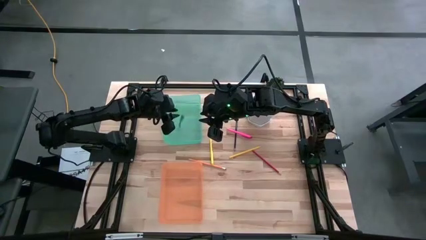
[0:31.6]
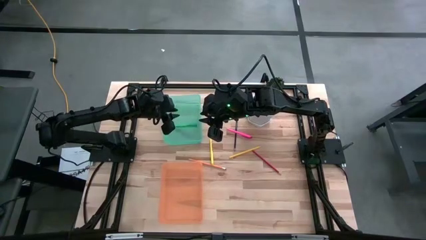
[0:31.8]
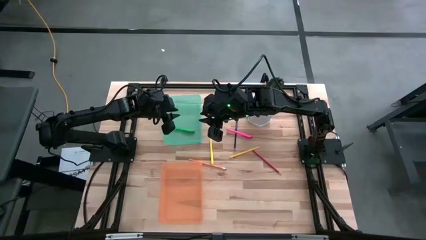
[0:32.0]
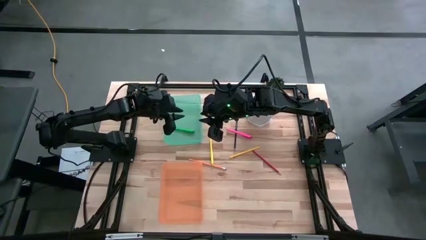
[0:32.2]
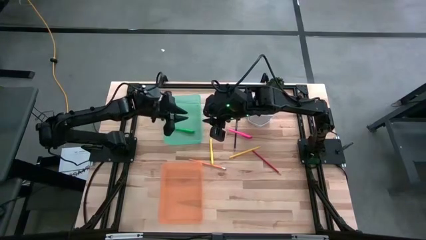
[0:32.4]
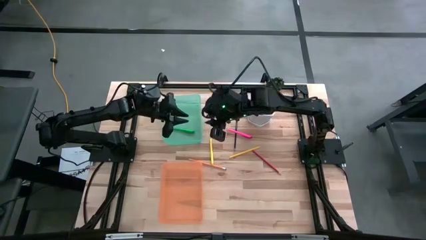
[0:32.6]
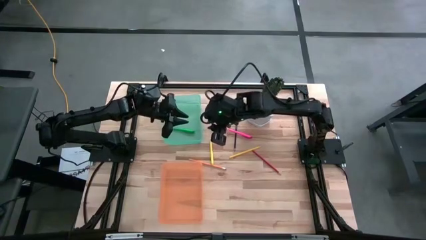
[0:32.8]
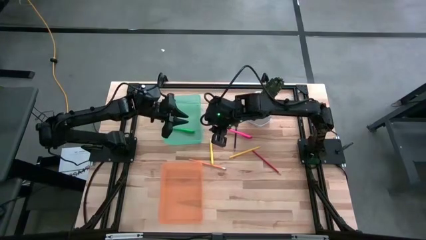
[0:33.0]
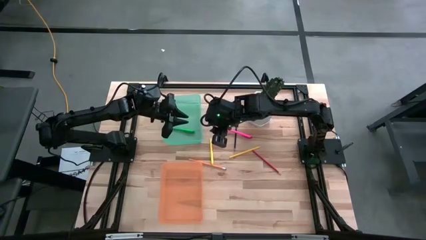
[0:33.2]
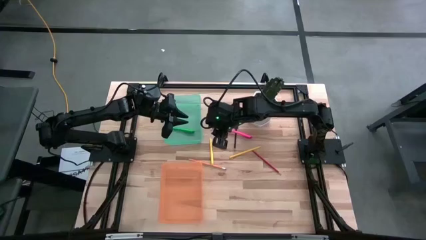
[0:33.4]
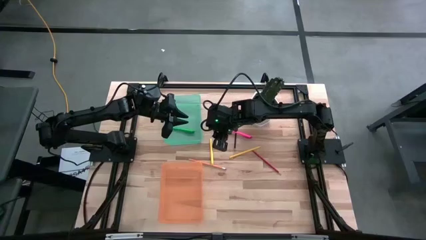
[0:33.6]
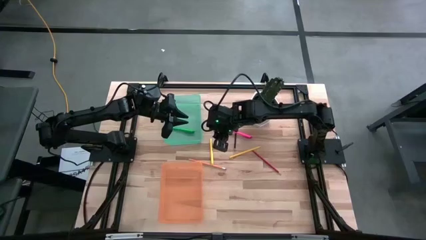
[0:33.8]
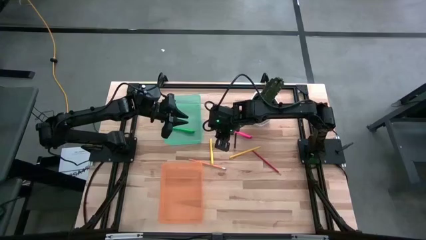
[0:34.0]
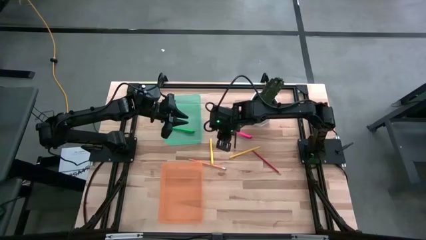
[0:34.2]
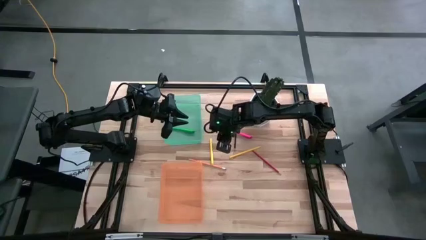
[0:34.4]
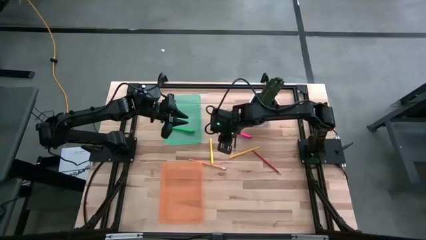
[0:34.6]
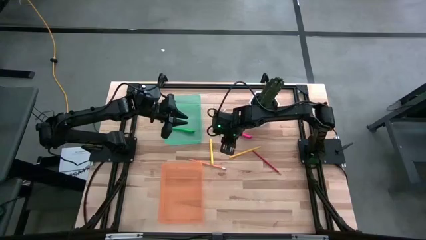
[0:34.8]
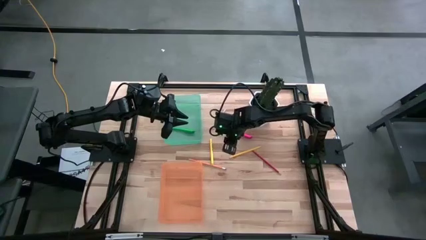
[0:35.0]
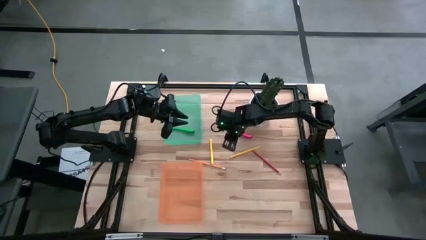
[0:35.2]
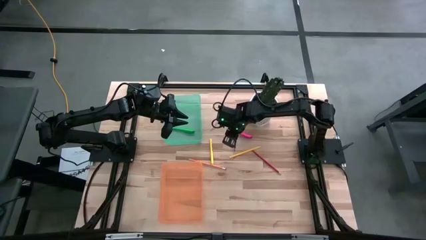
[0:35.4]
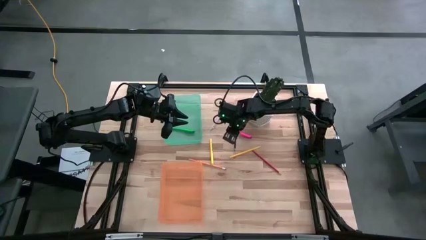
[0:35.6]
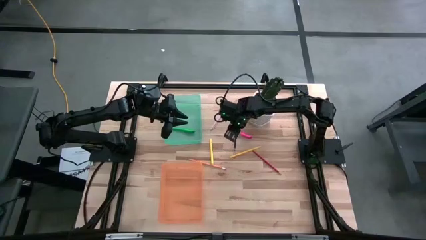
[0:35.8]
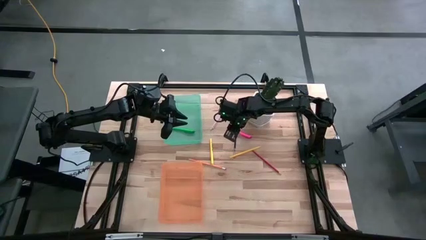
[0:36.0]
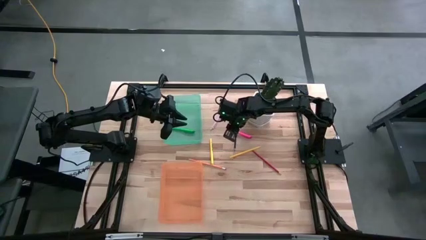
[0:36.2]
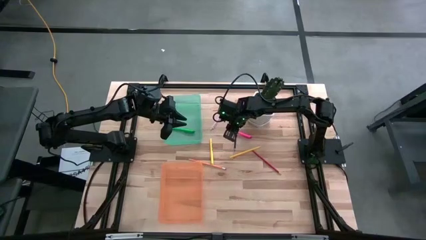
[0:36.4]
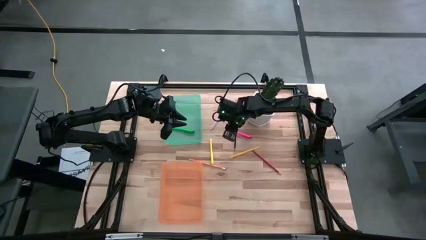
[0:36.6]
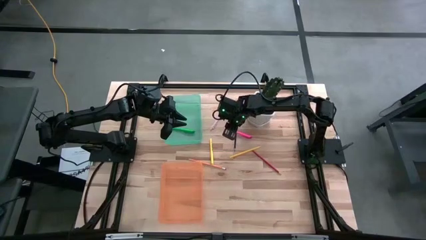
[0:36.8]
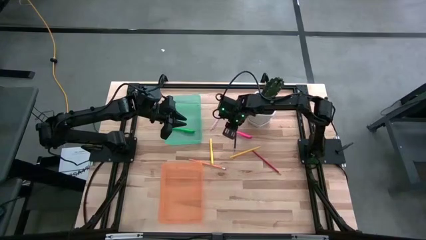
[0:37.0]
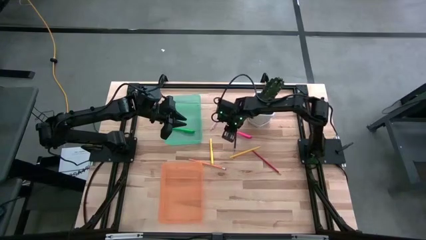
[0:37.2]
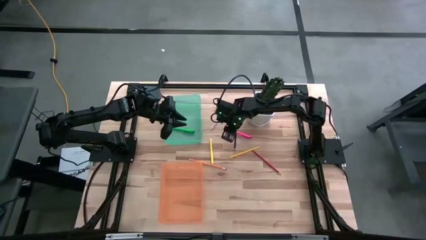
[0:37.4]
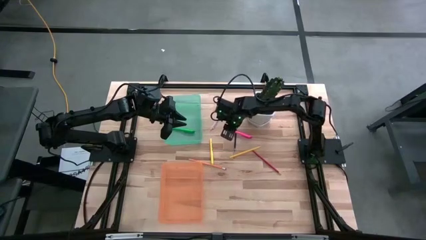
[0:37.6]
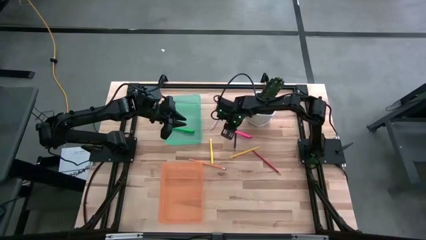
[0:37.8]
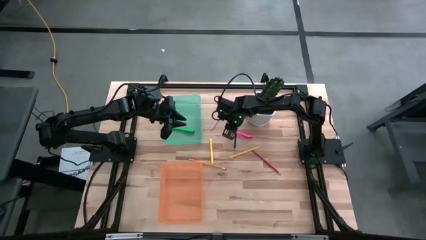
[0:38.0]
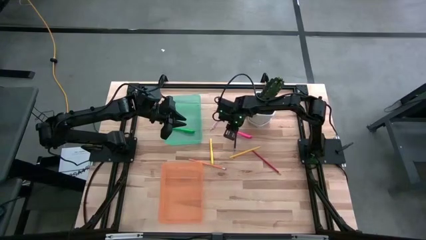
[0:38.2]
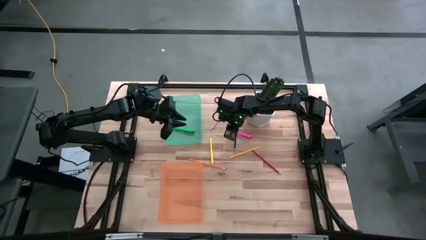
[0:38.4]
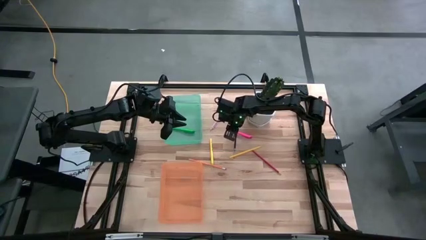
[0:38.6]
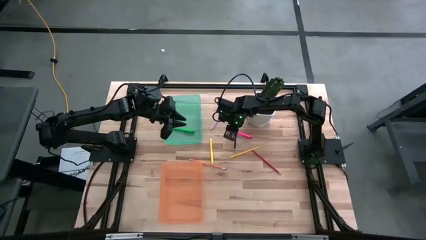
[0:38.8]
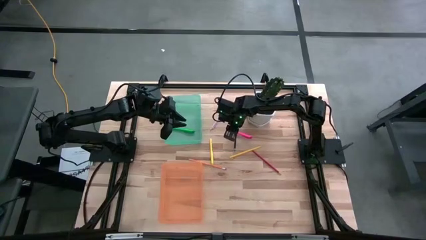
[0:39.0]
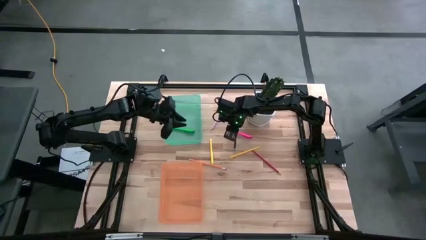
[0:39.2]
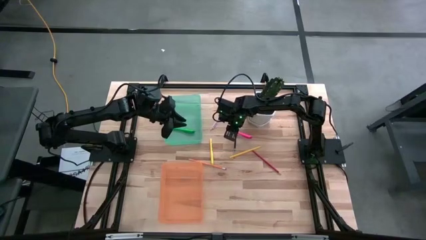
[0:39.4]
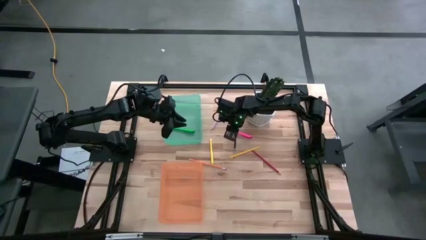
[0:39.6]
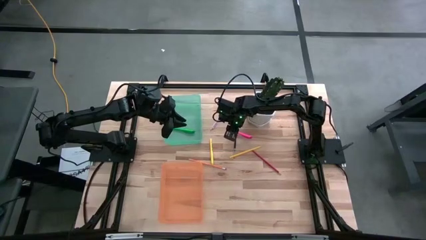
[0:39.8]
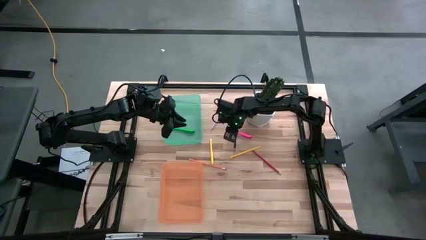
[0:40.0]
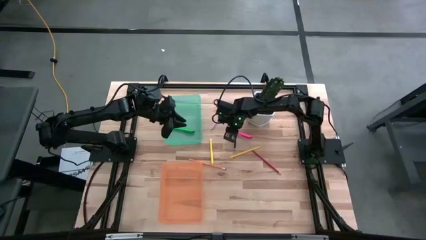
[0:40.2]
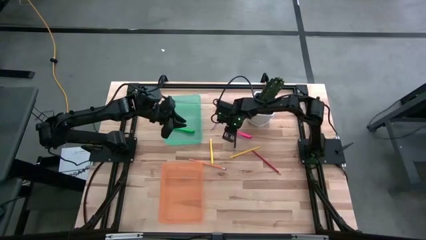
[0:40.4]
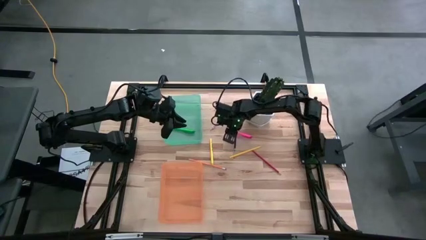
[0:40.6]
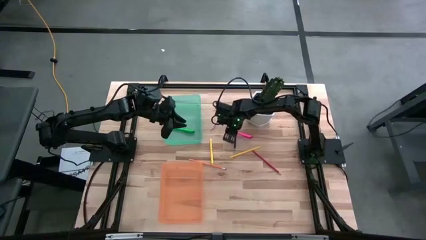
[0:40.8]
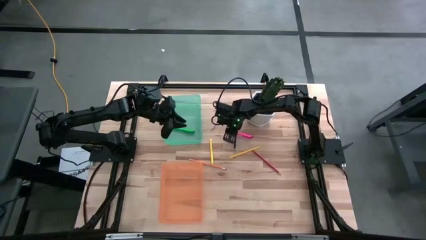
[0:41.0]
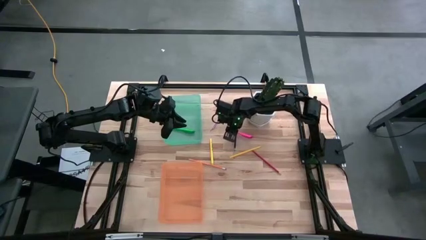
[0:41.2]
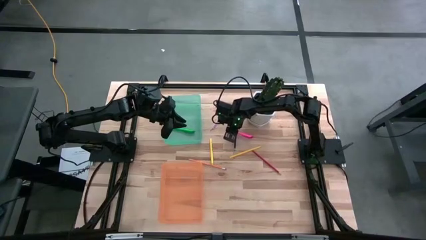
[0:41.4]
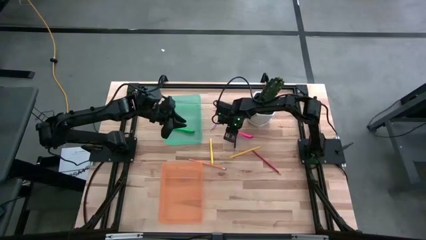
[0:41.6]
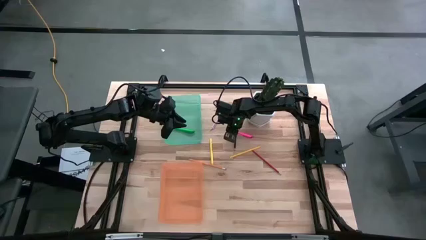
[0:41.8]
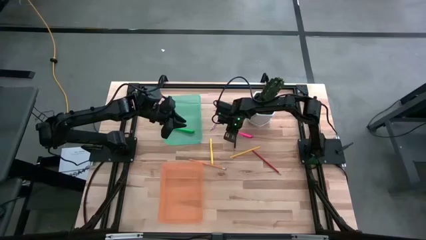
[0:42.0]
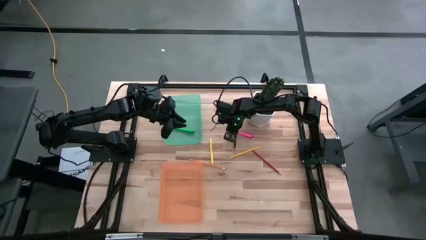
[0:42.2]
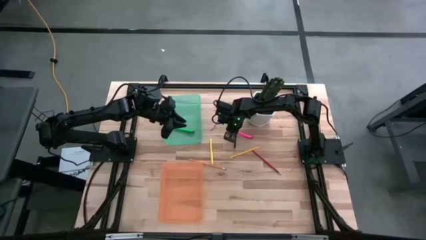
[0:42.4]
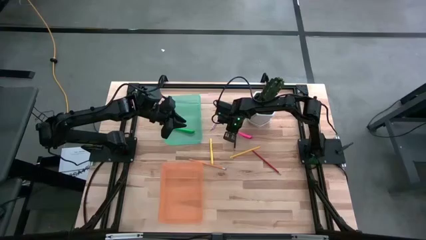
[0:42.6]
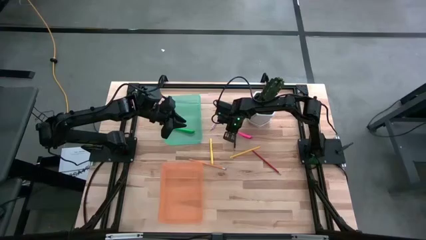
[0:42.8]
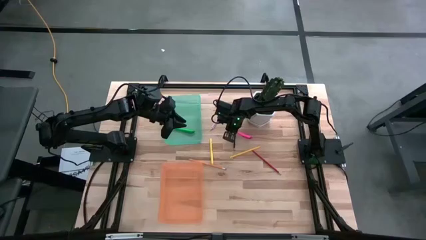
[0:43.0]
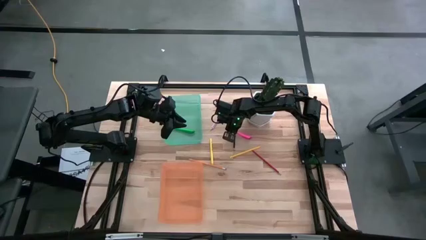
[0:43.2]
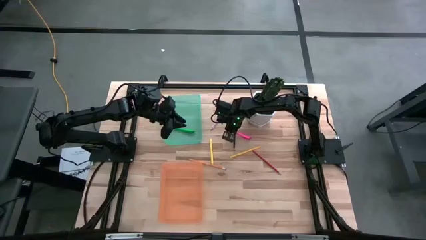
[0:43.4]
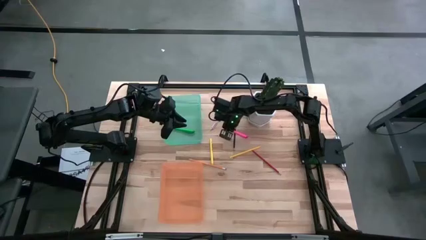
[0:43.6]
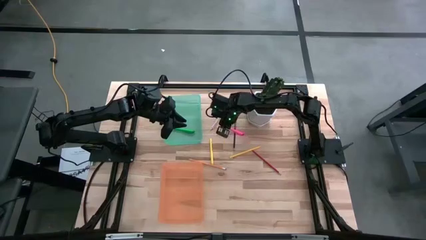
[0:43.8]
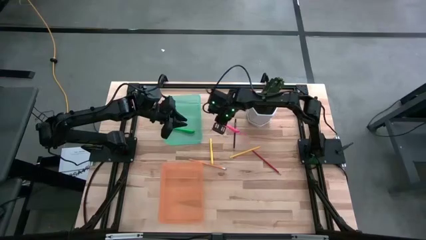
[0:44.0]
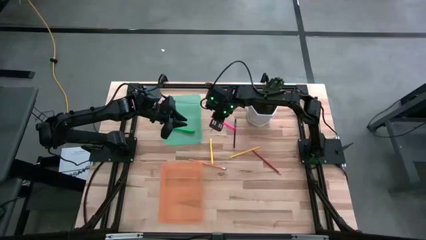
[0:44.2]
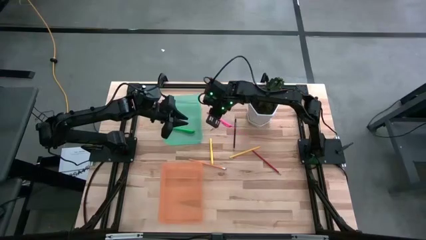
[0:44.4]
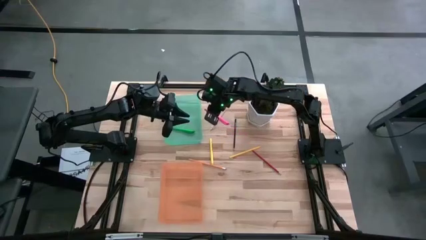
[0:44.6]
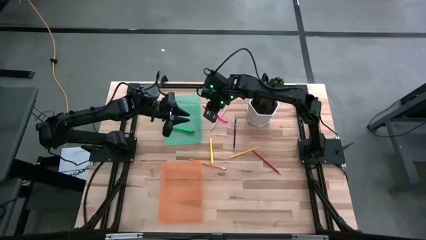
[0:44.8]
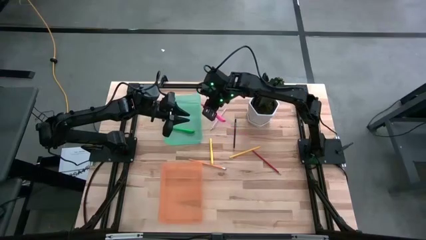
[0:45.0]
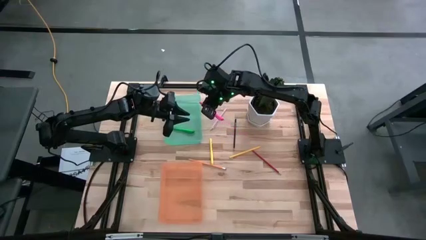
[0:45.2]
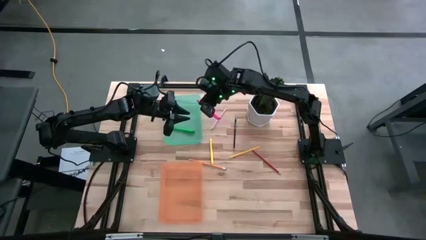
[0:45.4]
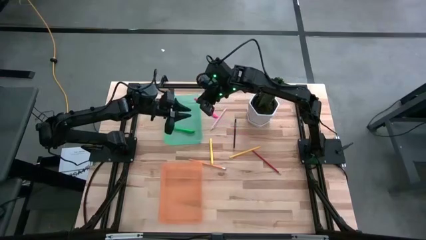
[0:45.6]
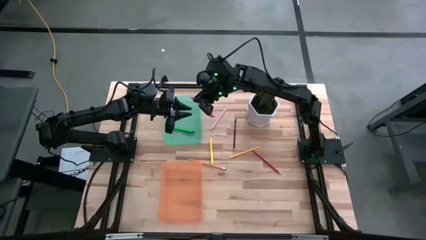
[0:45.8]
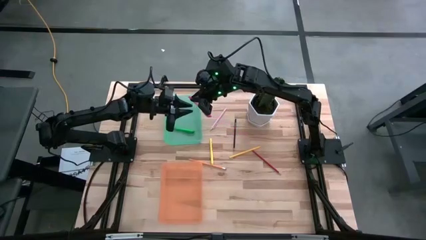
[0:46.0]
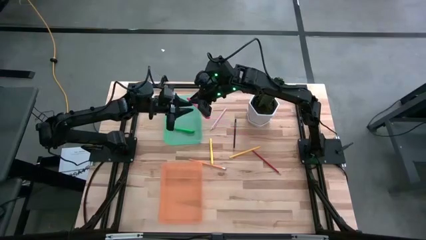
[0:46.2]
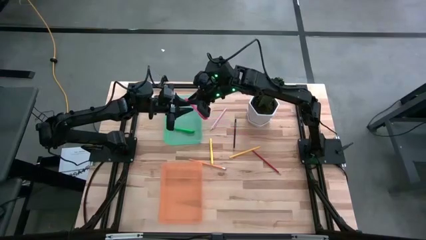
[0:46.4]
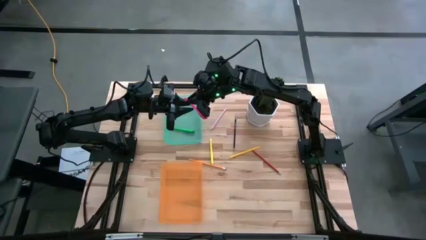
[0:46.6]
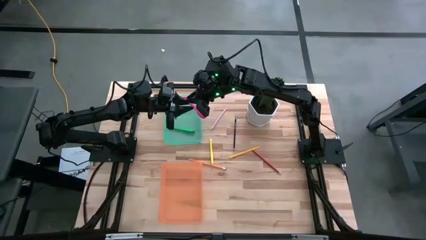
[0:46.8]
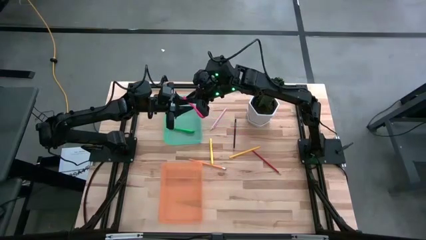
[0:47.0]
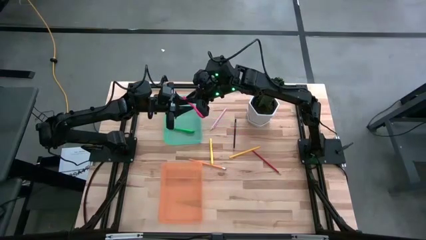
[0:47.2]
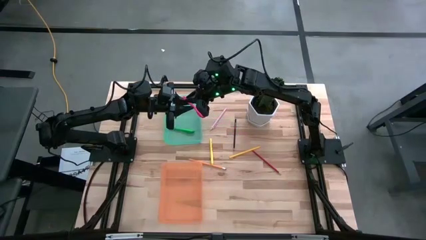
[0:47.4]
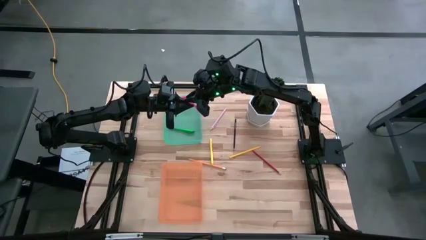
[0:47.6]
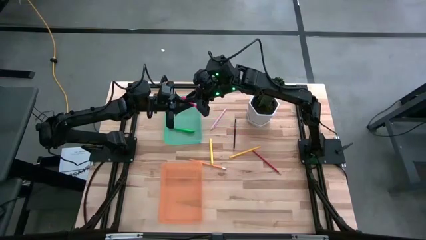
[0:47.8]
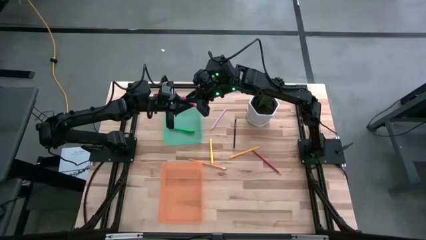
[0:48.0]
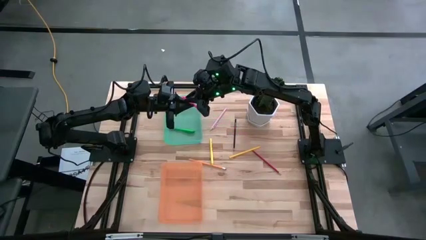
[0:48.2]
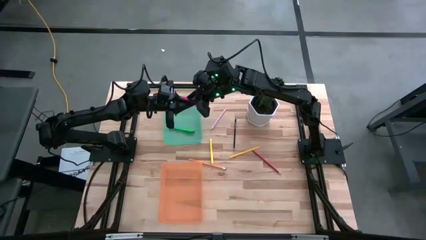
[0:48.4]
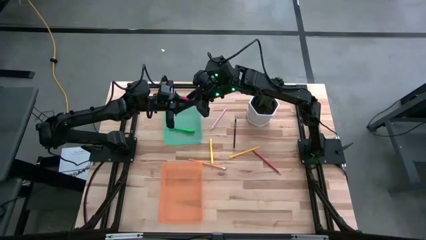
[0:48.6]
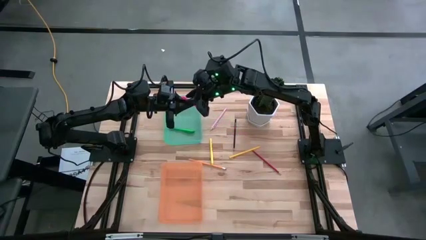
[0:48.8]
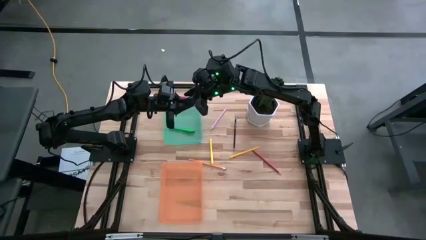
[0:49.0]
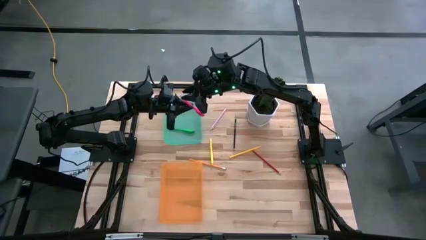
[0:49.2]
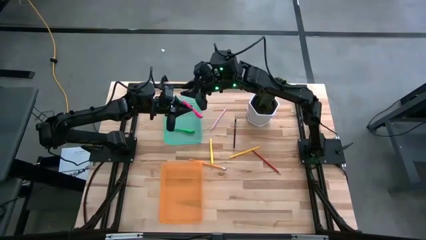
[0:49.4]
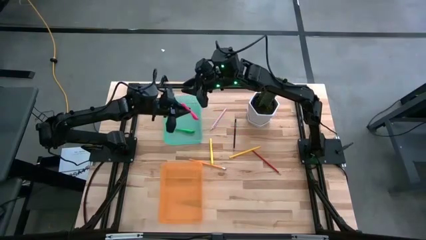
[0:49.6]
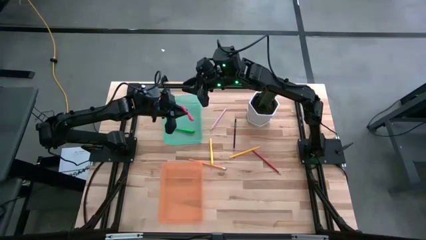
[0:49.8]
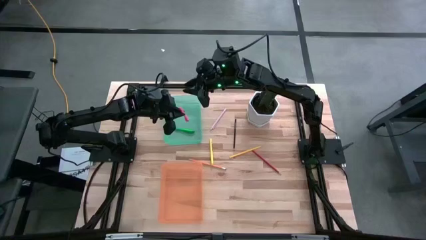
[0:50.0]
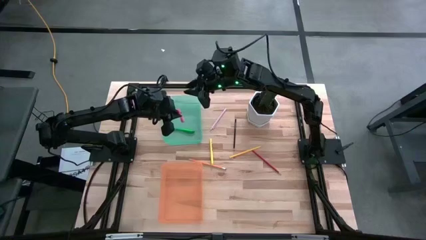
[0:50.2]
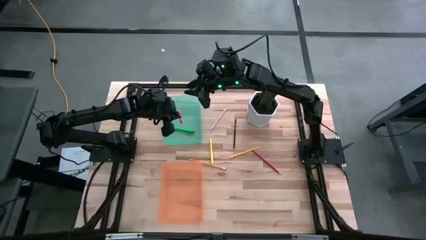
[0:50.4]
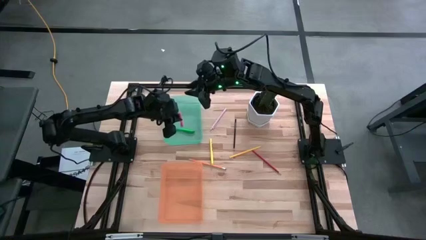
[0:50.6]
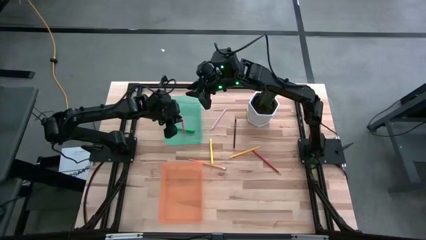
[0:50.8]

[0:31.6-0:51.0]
Task: Sort pens & pencils
Put the pink pen into the green bin
